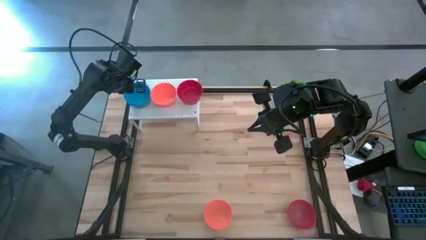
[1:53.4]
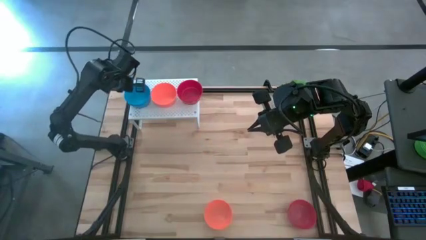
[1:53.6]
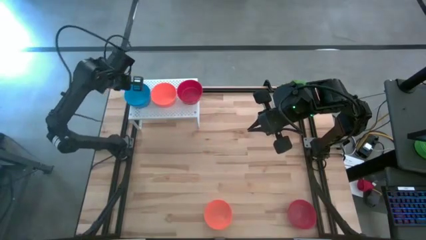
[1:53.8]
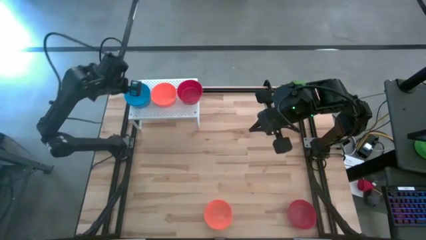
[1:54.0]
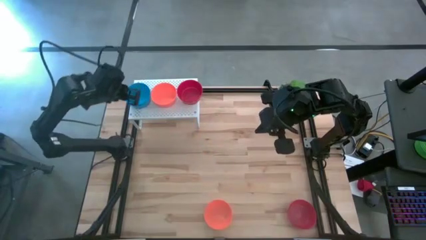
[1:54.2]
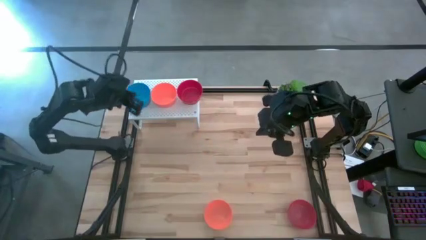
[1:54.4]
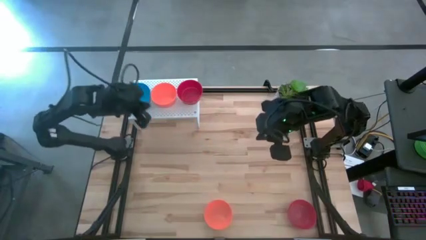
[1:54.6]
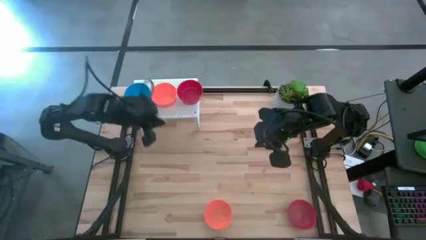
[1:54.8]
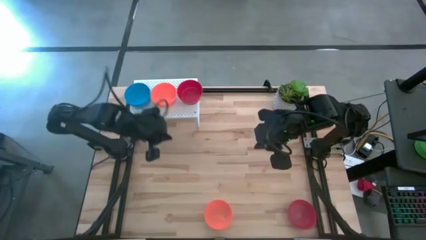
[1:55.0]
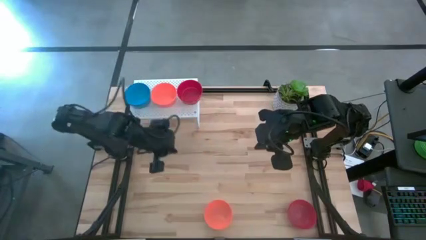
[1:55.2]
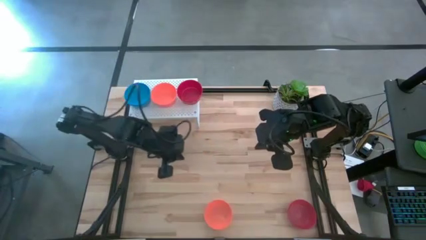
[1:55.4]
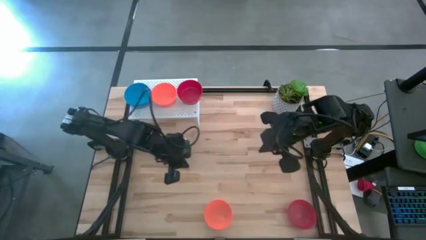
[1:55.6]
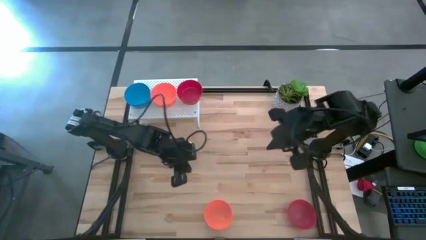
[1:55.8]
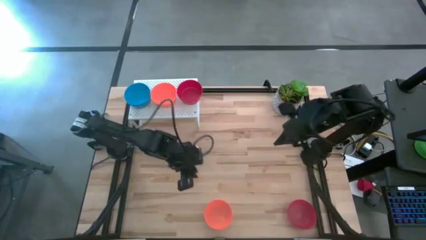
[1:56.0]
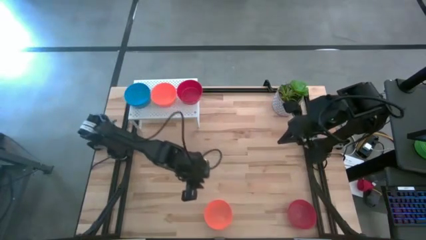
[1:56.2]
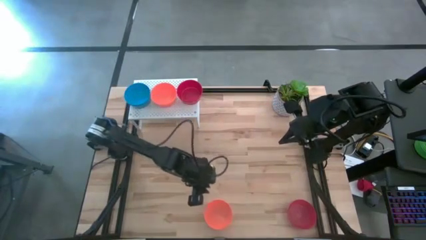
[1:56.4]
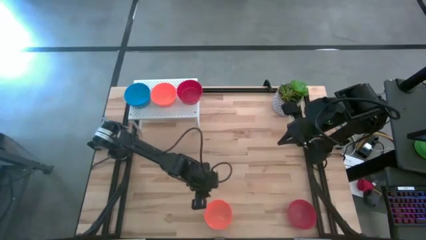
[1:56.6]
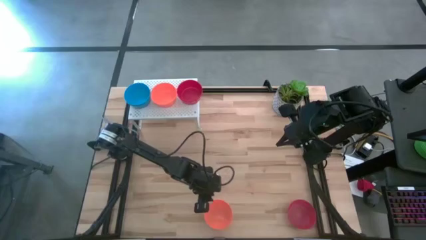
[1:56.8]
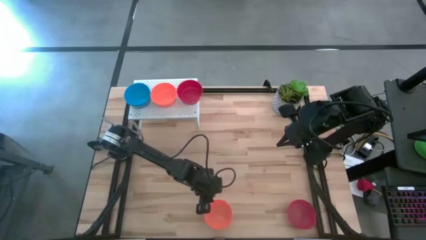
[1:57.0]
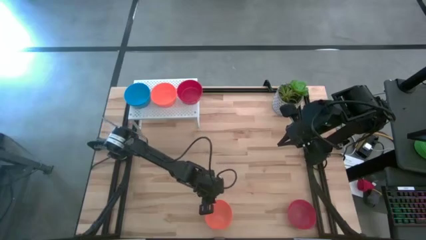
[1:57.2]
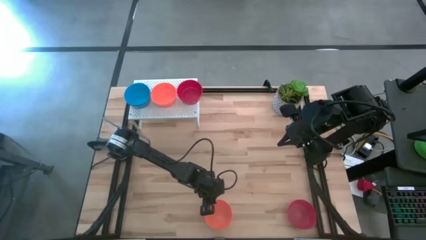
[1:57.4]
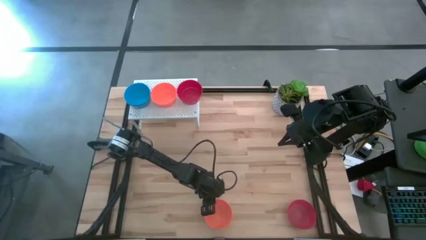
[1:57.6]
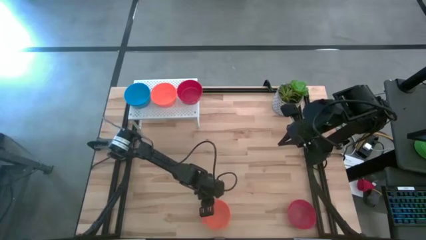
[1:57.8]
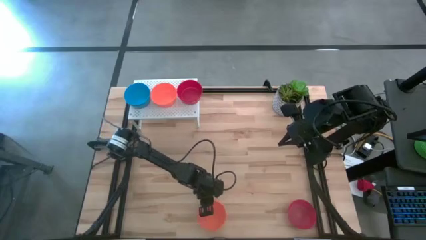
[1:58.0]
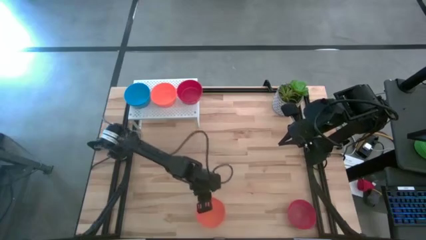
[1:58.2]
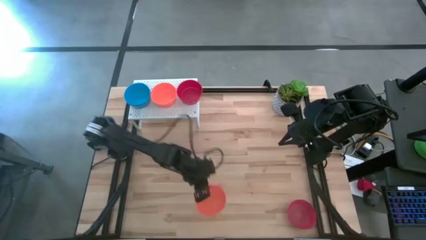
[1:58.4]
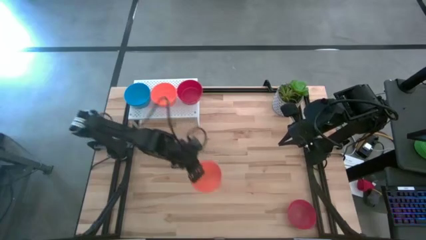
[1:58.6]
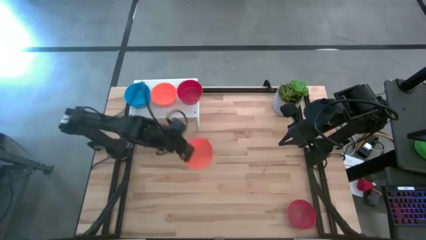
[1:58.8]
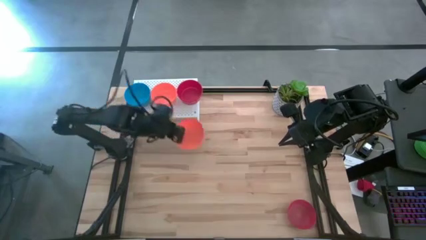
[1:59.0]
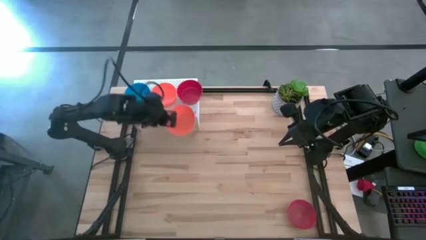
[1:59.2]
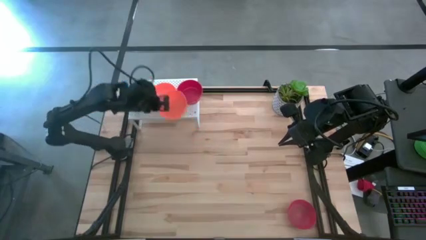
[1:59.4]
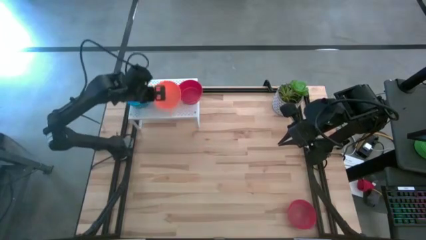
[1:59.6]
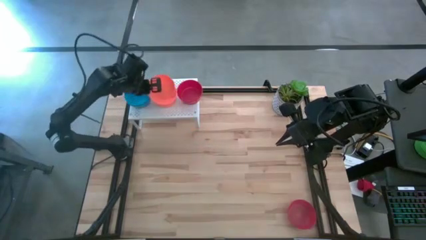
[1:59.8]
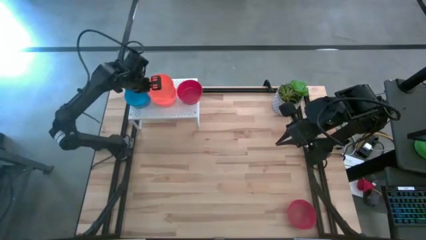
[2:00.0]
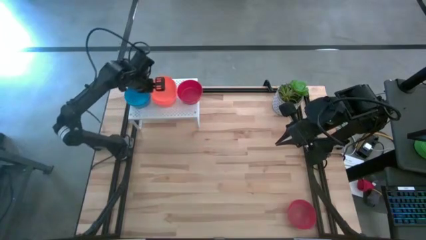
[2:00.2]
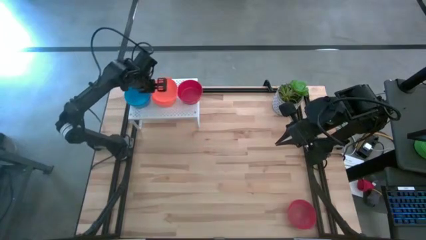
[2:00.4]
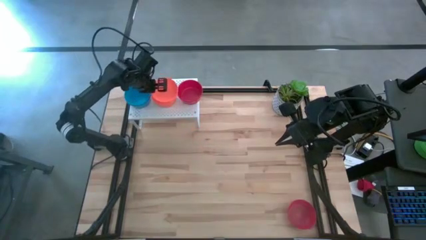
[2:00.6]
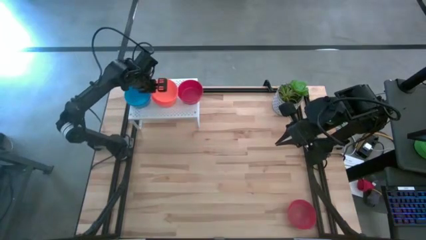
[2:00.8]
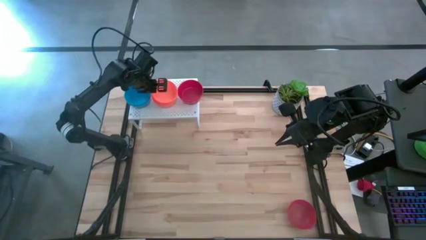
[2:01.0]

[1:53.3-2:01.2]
Task: Pick & Place Mini bowls
Stack the orange bowl on top of the orange bowl on the shelf

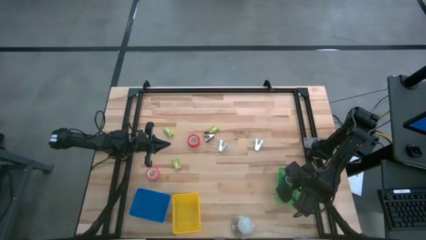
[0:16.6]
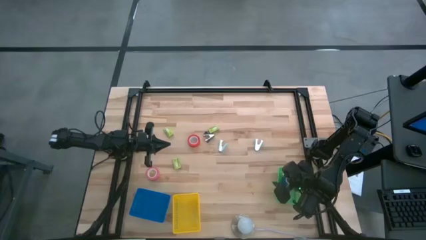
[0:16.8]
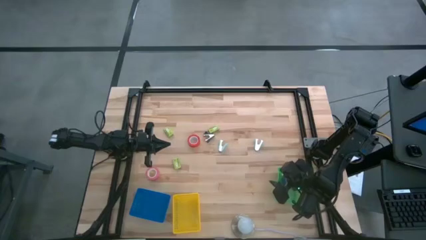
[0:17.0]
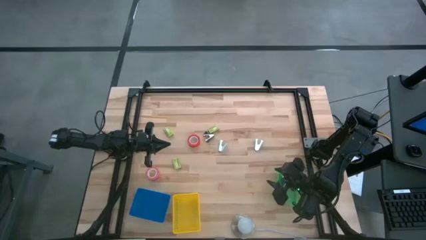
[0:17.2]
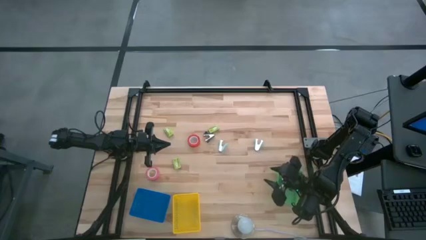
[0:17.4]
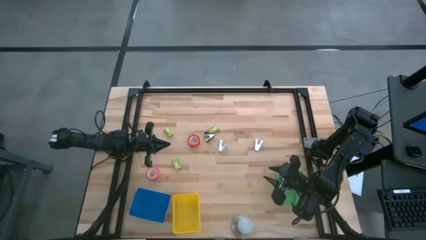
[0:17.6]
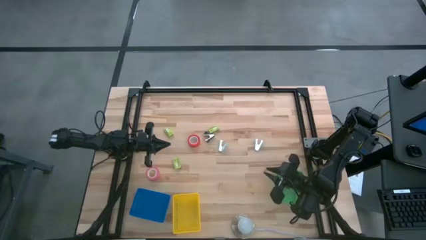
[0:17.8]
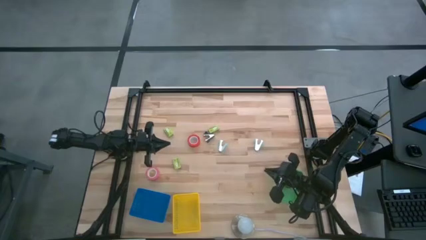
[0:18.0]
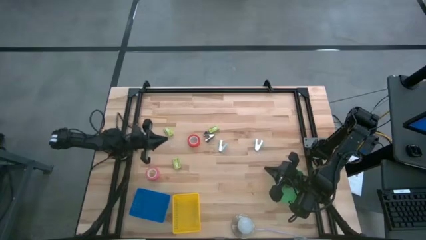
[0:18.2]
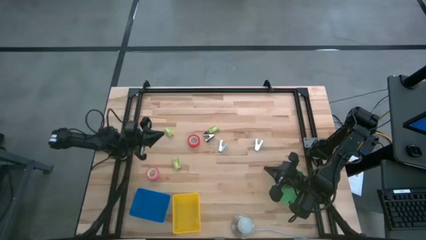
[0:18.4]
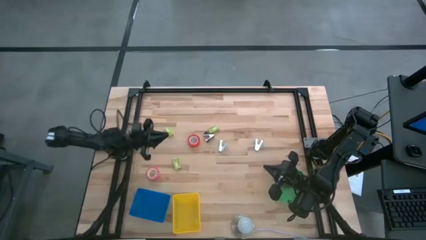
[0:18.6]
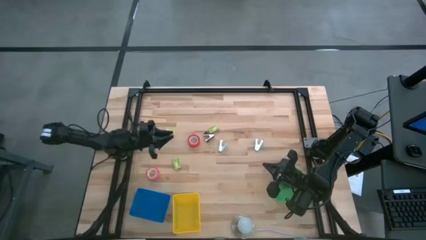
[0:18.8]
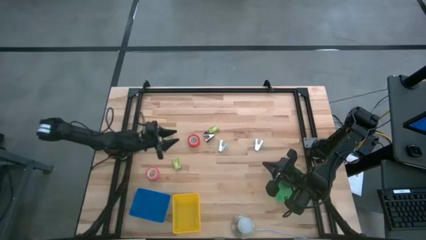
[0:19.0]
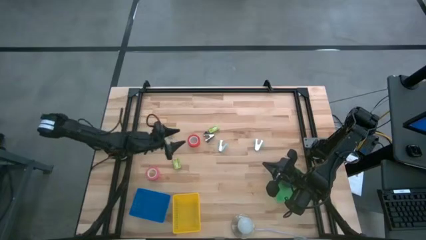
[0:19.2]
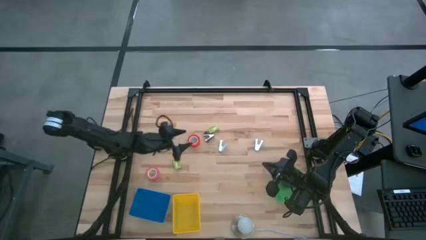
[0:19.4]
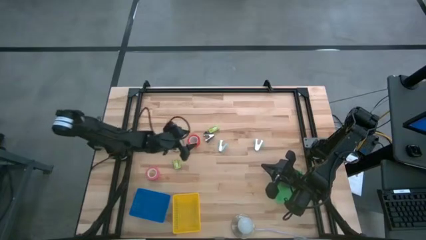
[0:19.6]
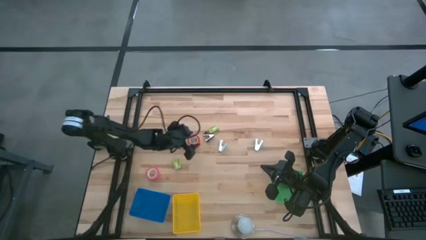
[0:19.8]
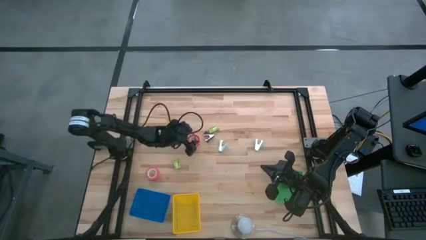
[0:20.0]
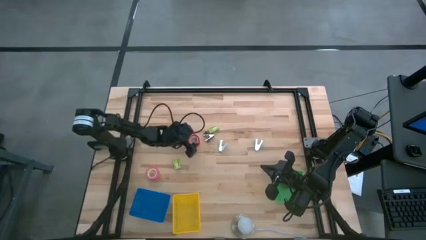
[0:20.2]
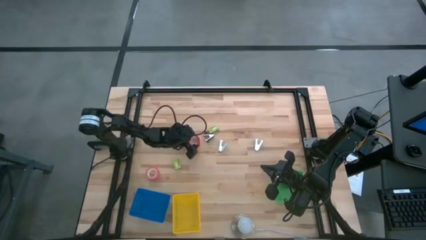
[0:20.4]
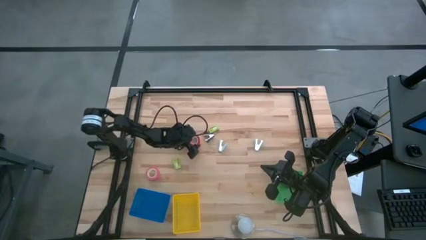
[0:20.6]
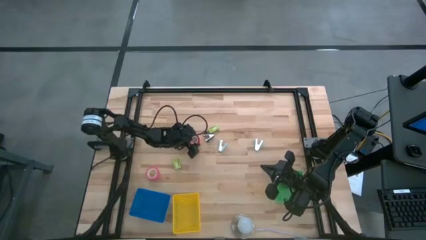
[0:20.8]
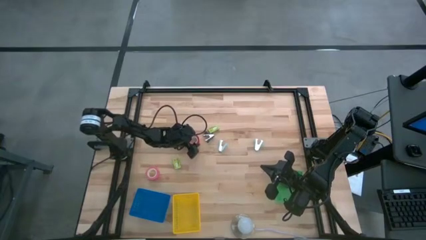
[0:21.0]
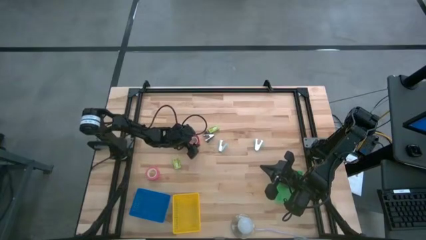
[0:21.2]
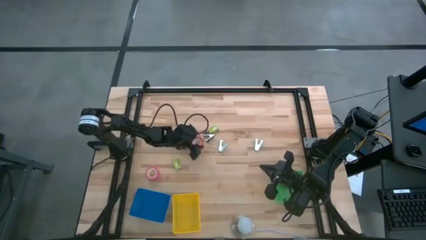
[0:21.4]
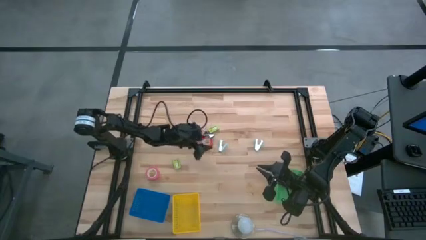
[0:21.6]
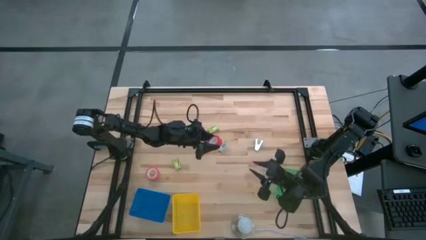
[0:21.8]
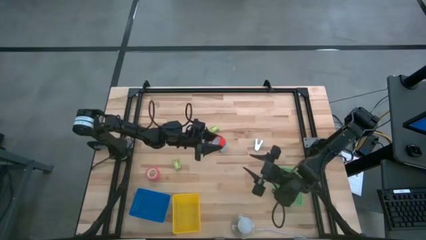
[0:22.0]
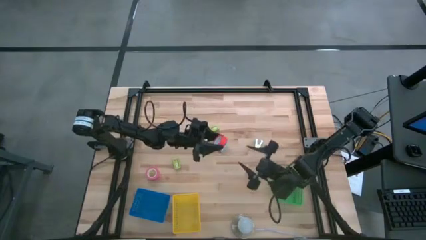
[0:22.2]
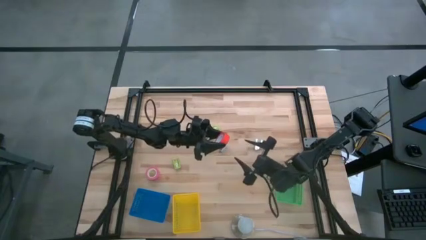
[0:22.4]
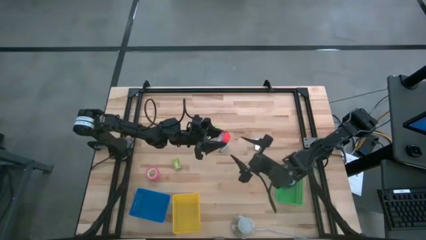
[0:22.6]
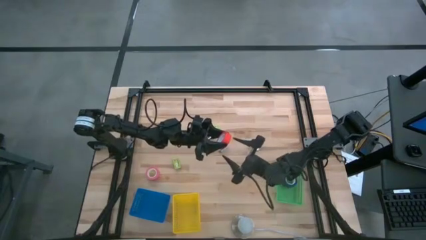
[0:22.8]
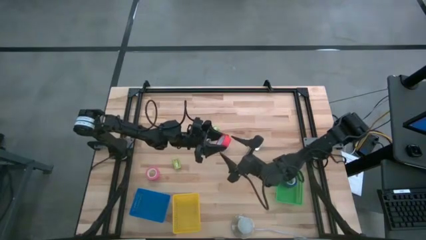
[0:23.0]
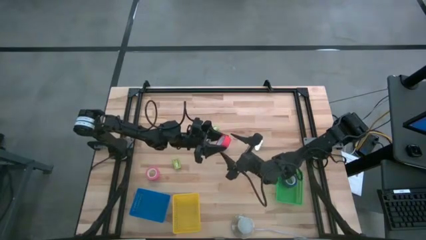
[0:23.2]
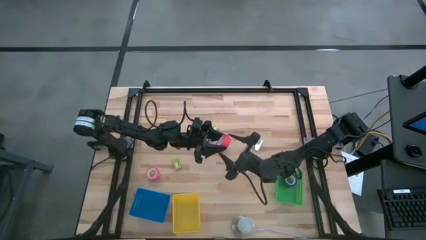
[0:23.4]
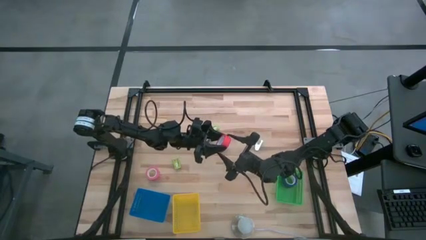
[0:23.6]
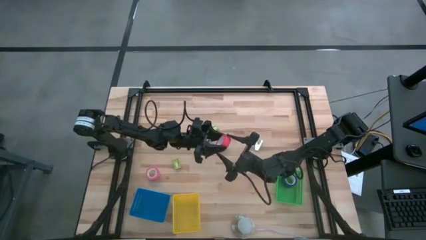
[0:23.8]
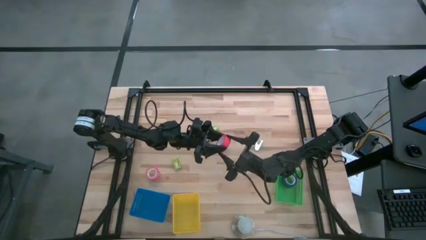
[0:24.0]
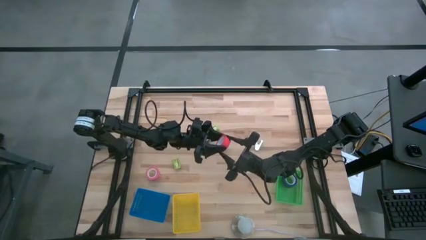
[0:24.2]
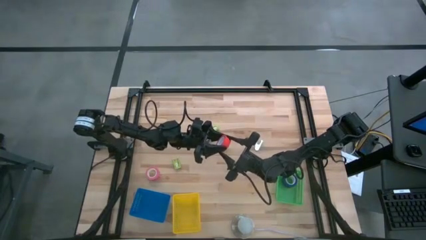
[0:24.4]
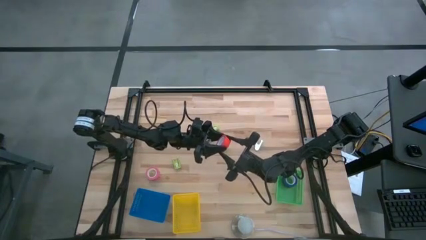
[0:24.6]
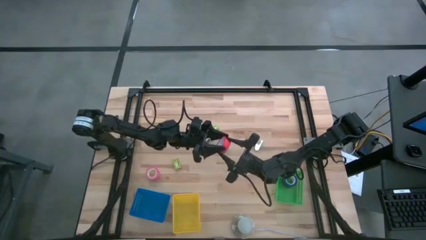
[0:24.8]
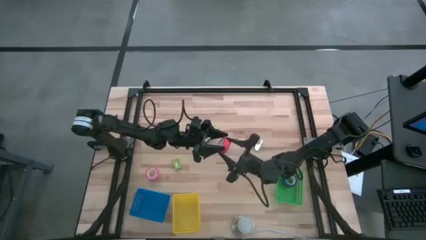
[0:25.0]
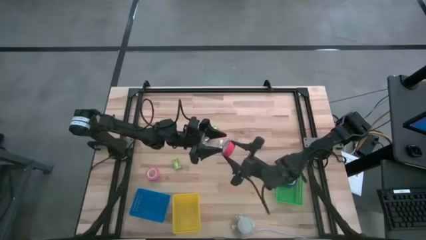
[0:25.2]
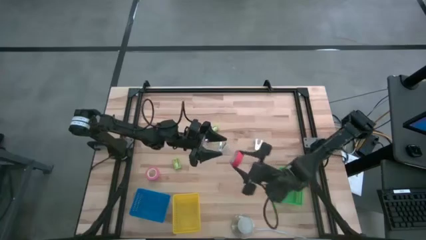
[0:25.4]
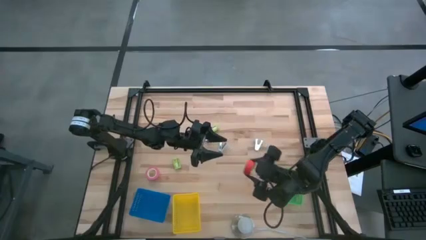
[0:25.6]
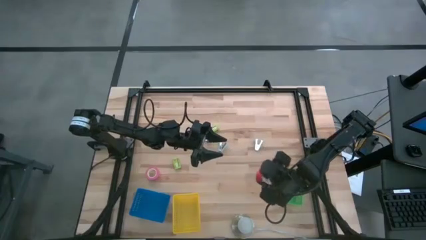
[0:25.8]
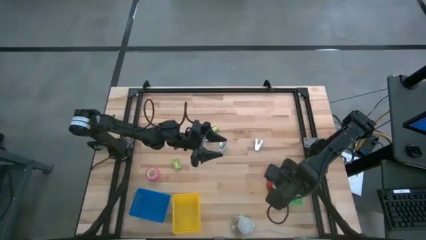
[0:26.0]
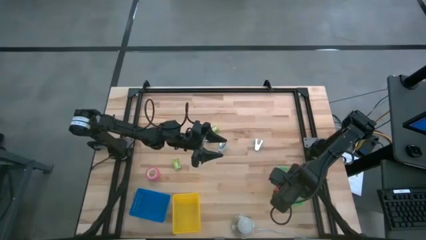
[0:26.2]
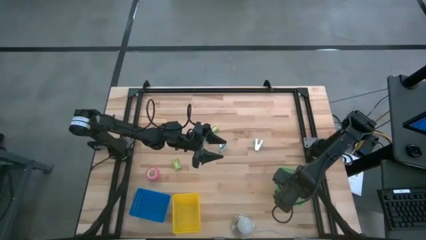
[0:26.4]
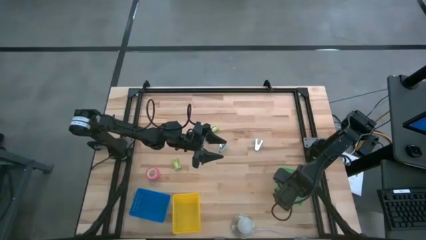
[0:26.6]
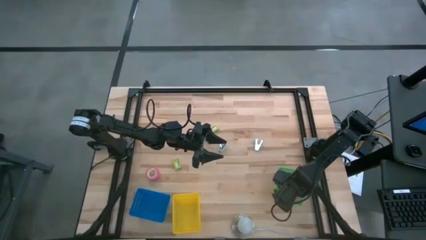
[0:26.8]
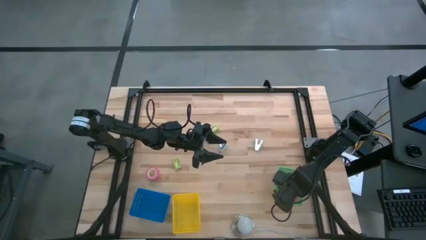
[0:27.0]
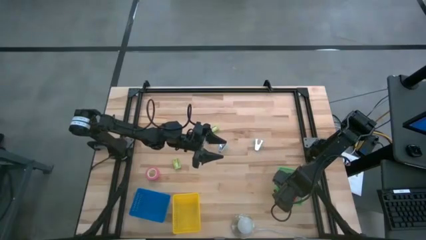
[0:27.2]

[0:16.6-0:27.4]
Task: Pick and place Stapler, Stapler remover, tape
Put the orange tape into the green basket
